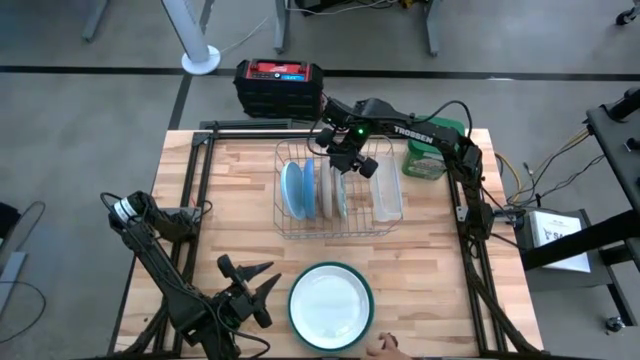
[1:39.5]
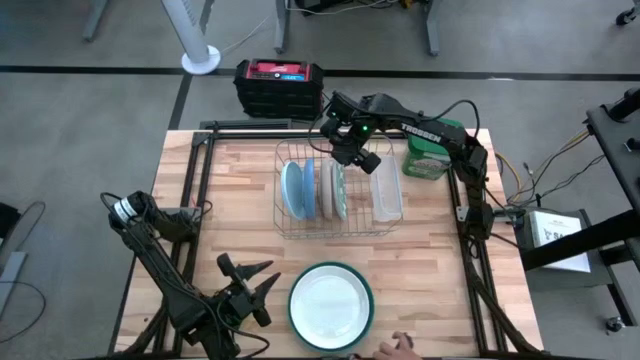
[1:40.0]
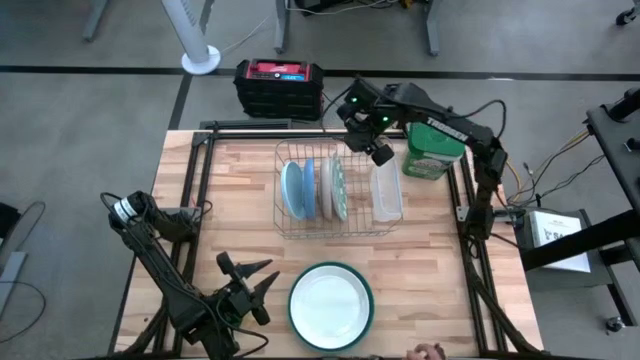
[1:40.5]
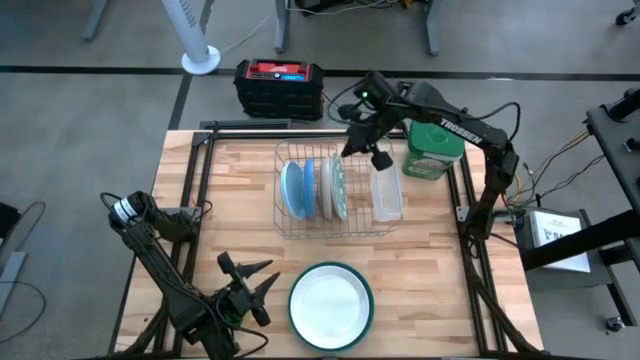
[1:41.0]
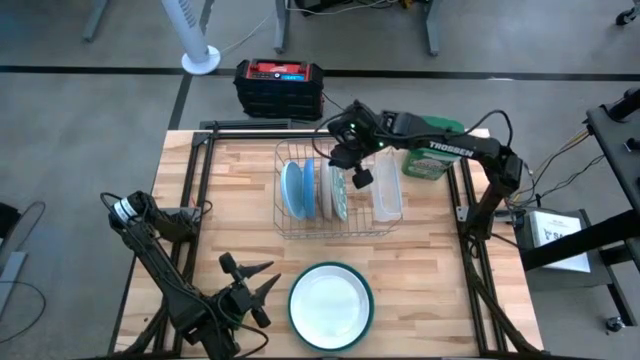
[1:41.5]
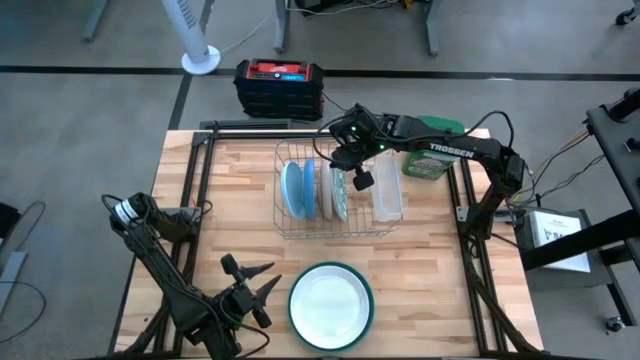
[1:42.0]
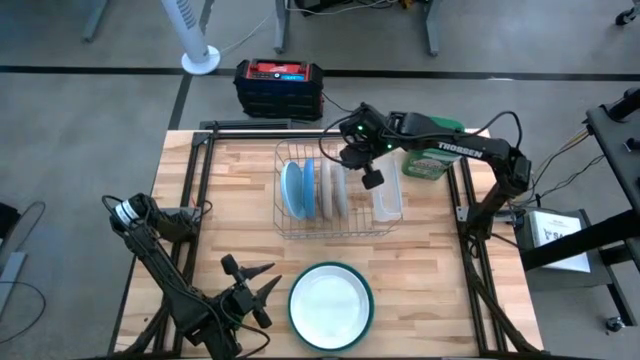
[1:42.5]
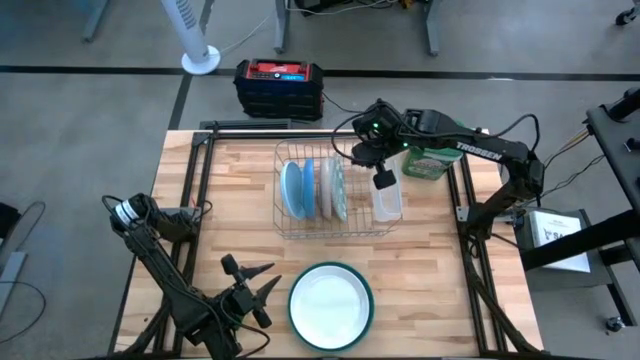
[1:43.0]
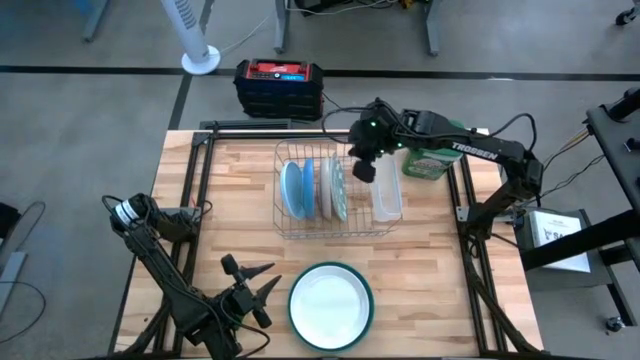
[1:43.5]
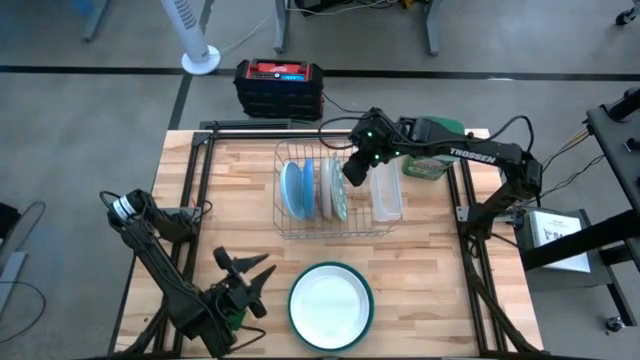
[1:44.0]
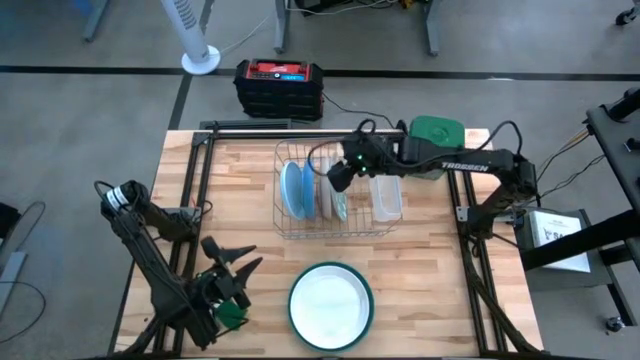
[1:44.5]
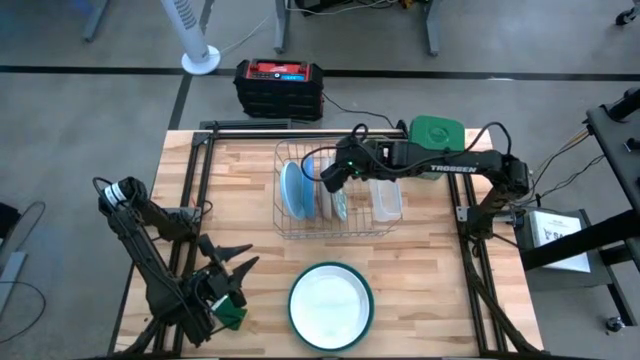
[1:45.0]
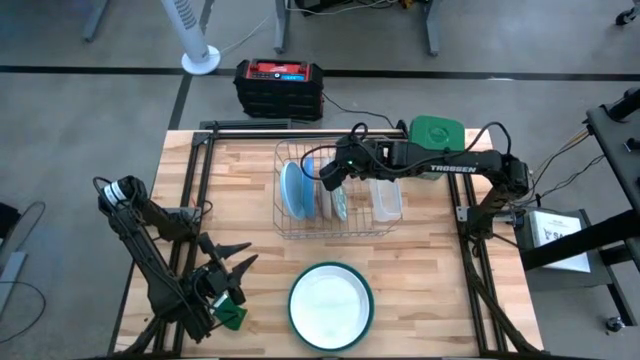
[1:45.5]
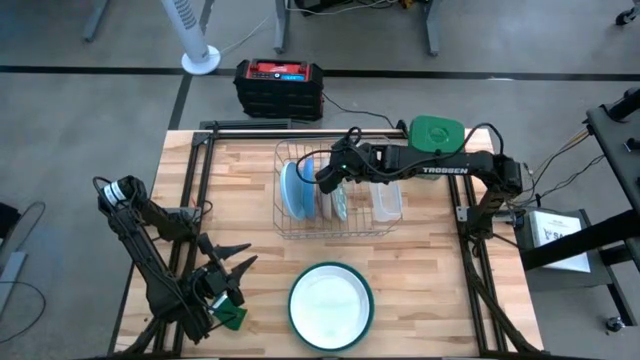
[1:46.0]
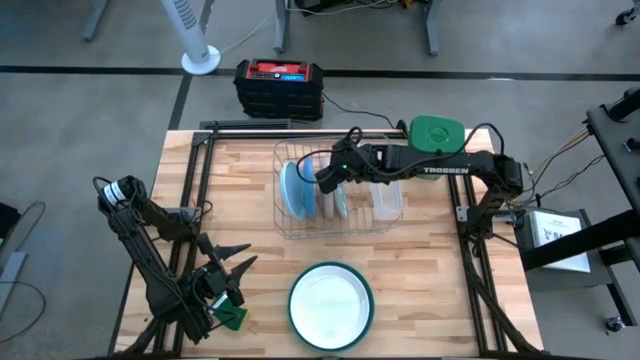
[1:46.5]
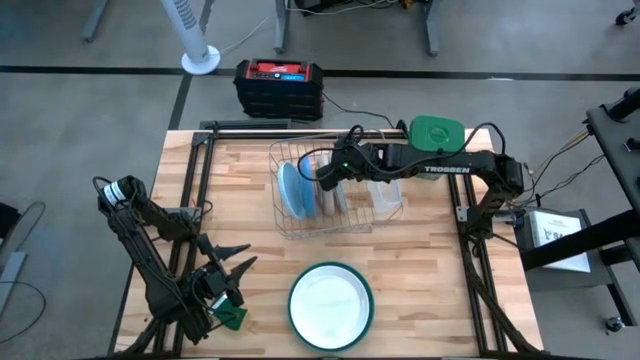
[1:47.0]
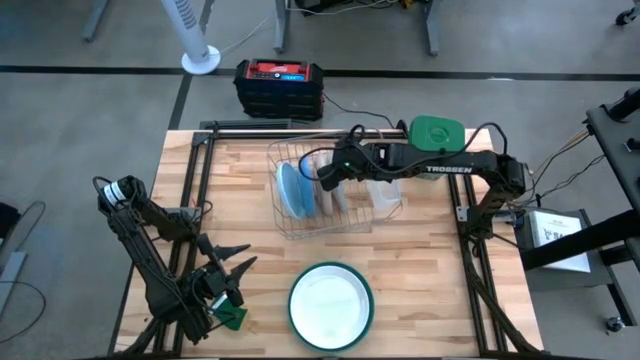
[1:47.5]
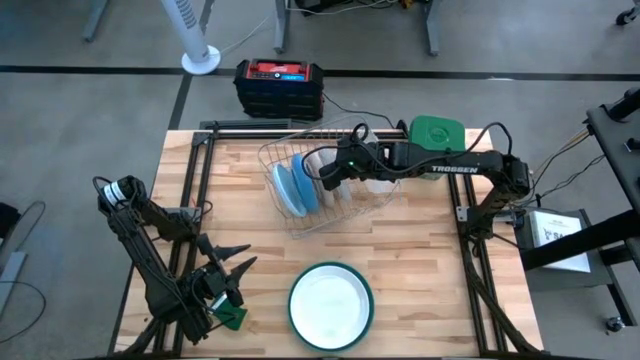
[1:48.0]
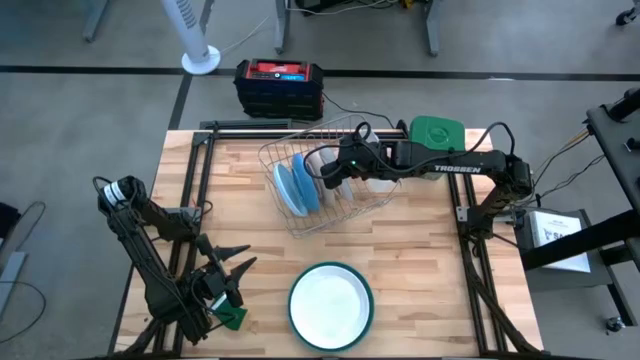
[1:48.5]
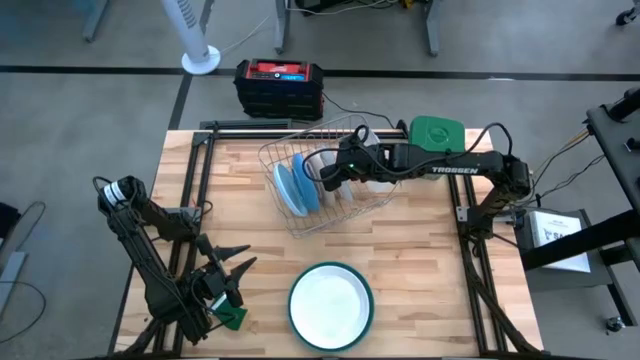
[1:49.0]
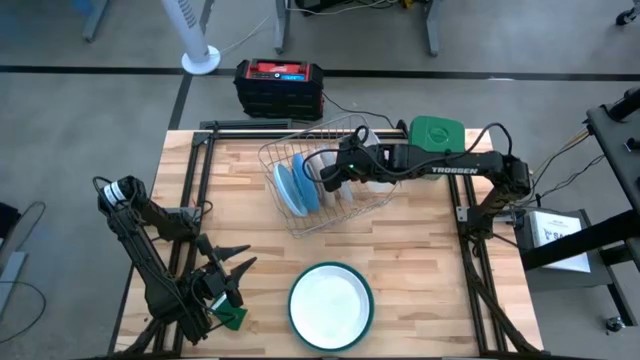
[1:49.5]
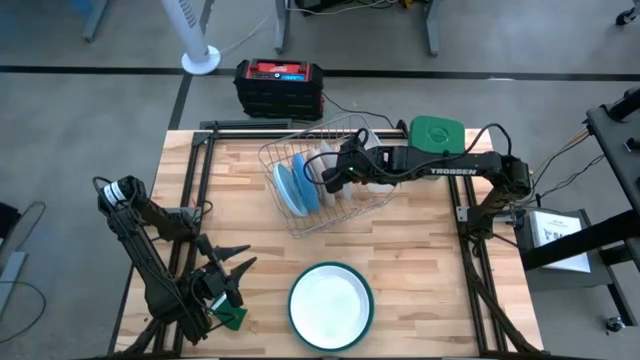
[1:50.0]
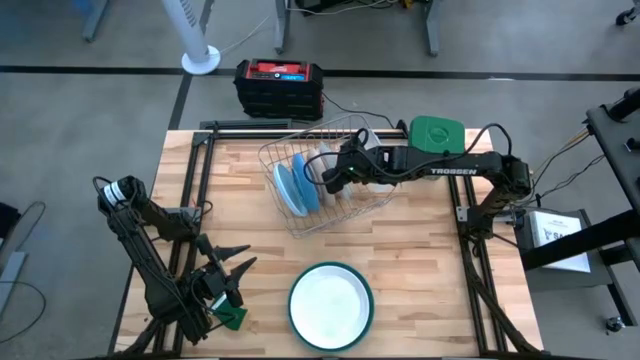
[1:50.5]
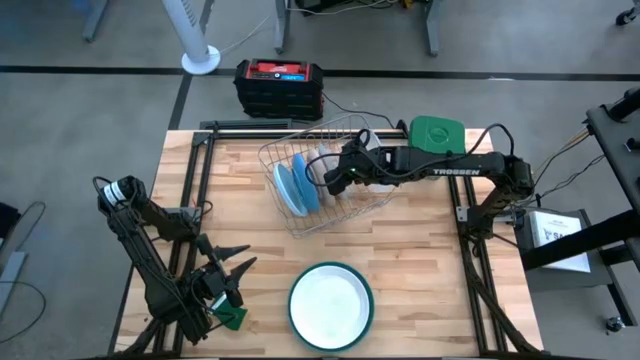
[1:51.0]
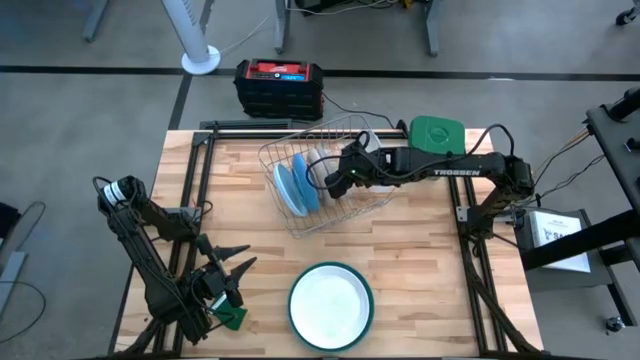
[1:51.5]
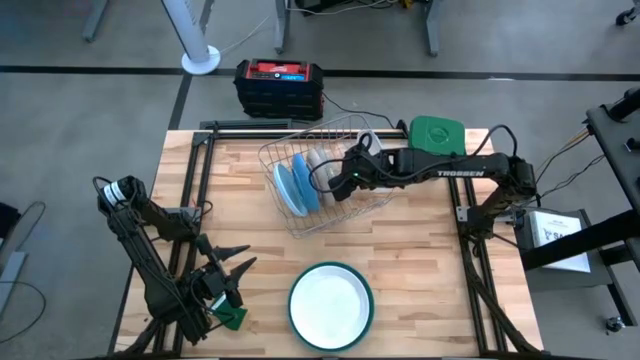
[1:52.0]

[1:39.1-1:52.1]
Task: Sort dishes
Put the green patterned plate in the dish rack

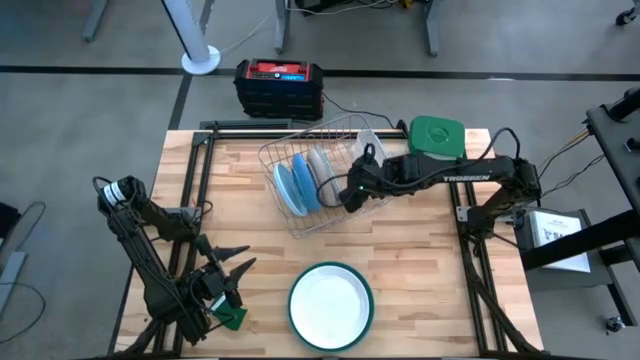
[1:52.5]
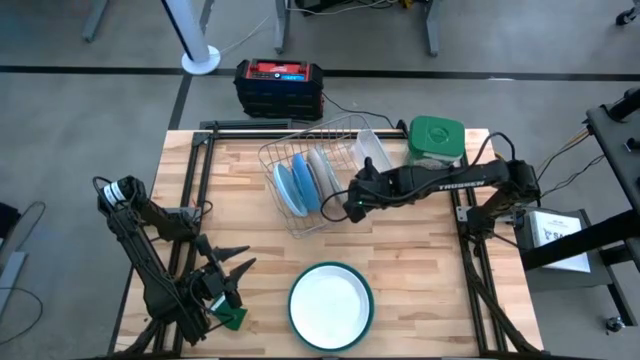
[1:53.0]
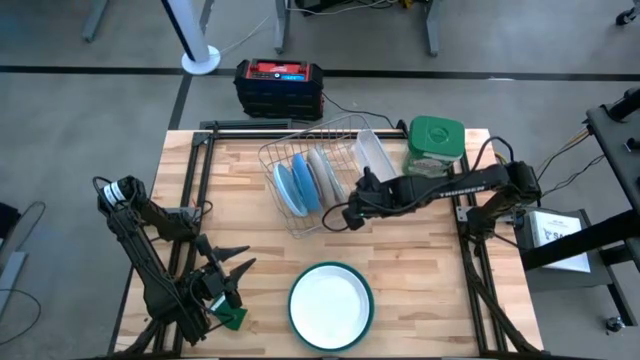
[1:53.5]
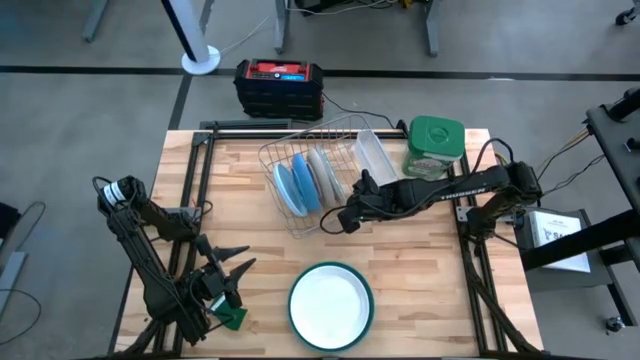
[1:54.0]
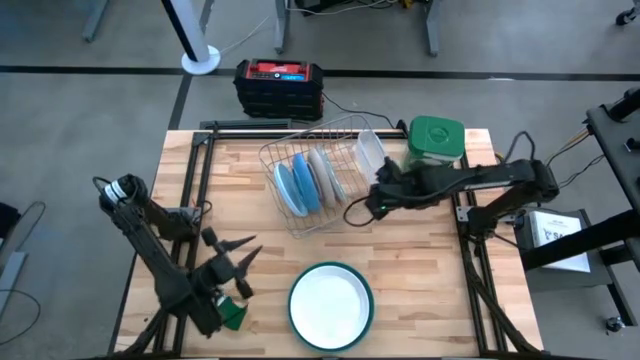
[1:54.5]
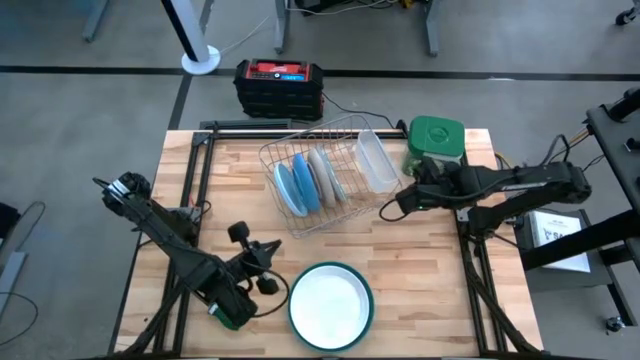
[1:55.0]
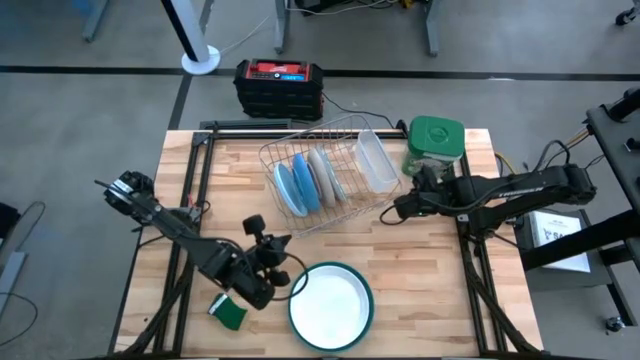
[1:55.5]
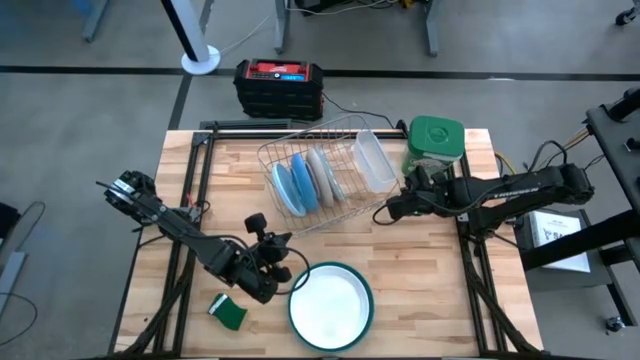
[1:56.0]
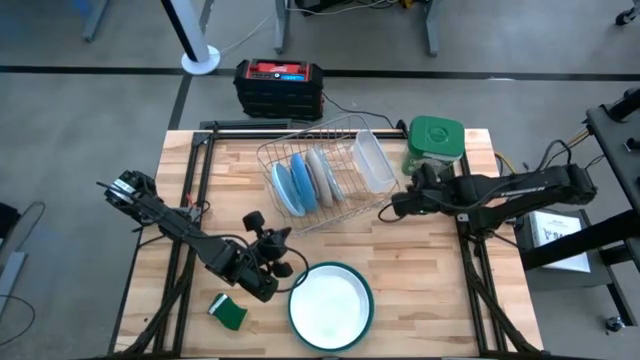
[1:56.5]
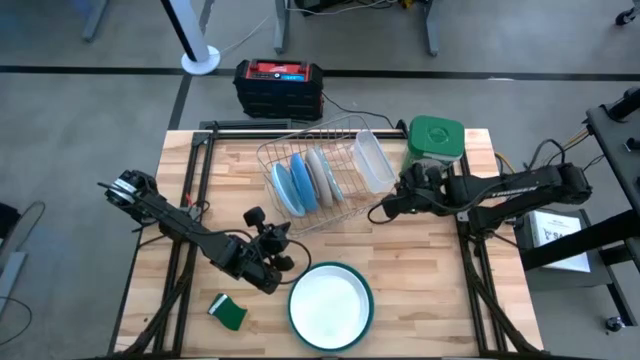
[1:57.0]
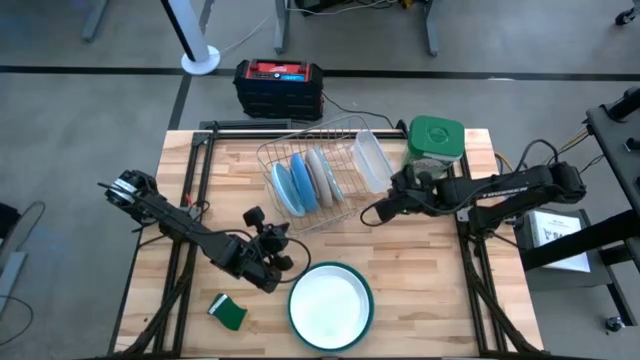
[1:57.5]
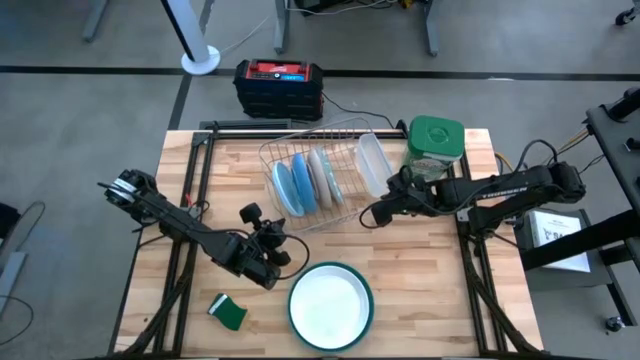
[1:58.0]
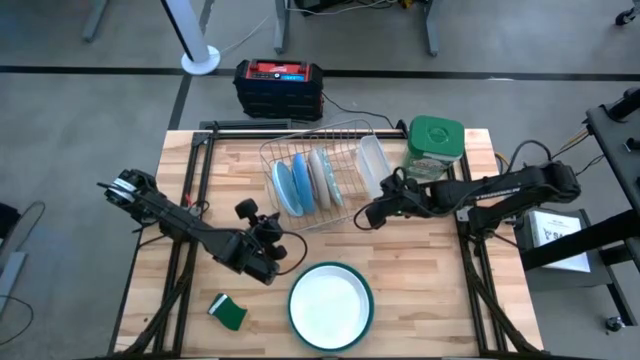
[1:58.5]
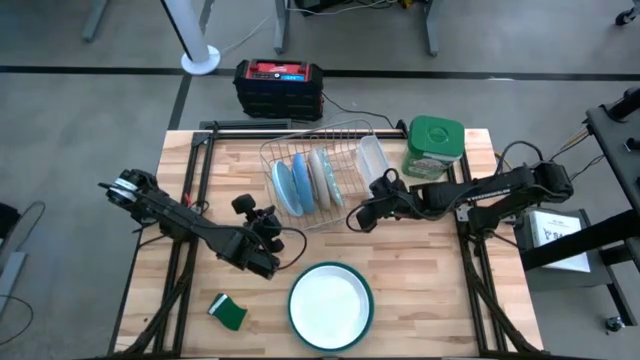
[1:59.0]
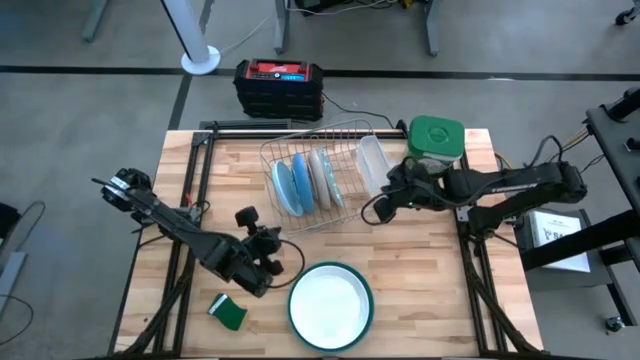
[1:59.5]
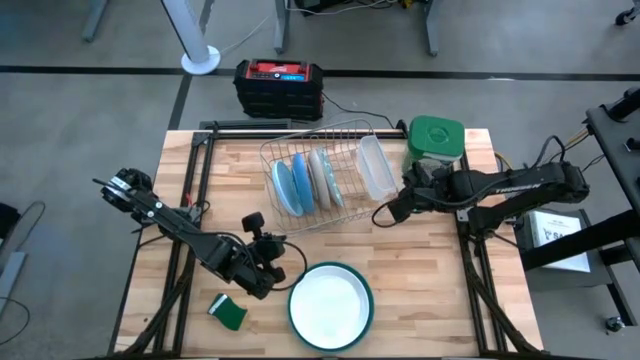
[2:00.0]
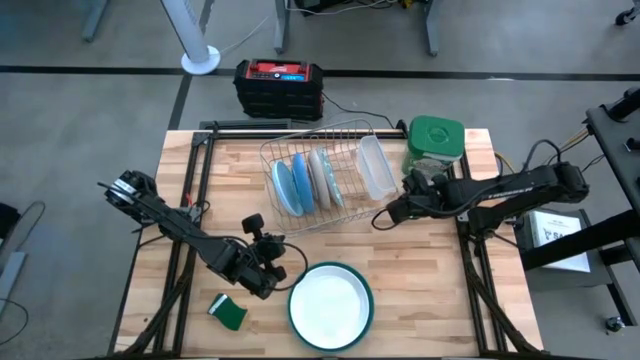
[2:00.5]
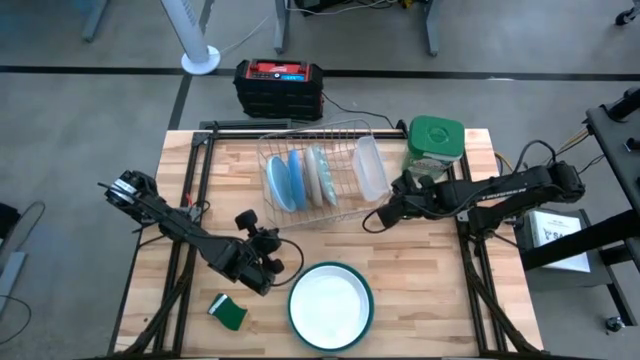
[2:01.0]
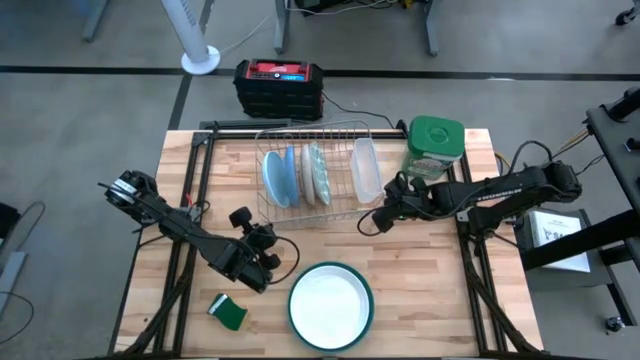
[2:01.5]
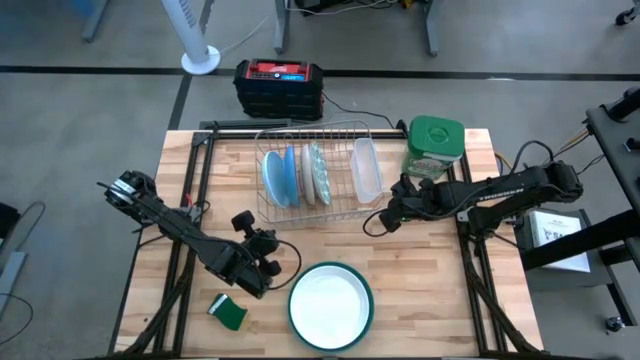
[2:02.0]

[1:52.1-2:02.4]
Adjust the dish rack
